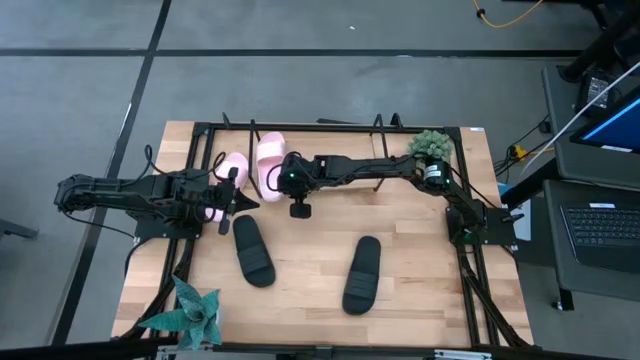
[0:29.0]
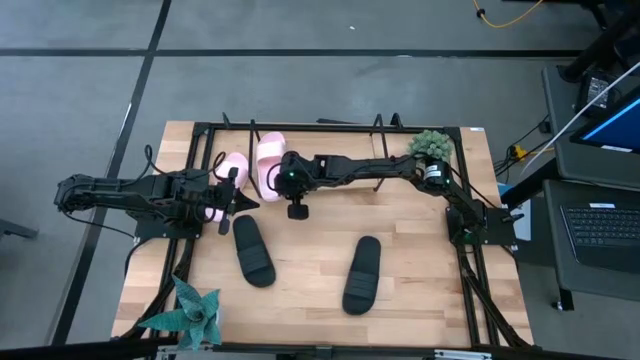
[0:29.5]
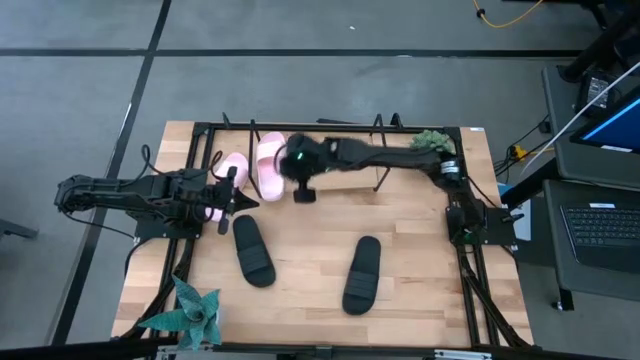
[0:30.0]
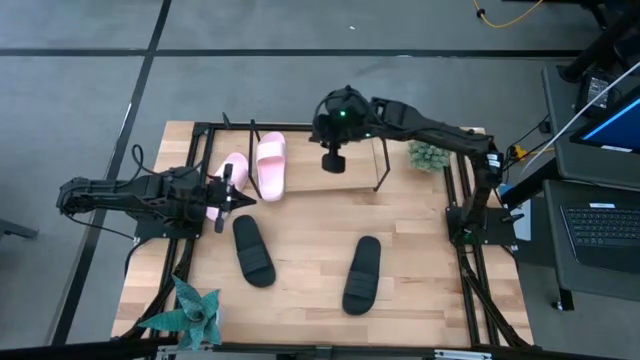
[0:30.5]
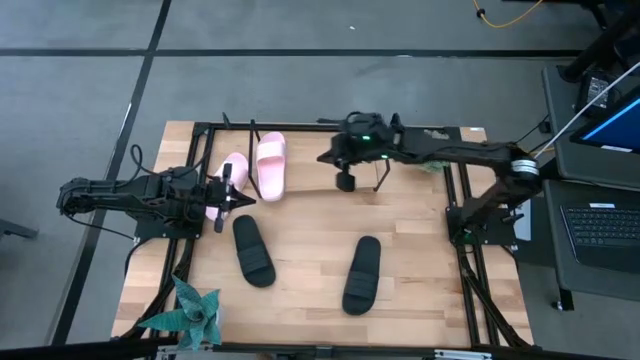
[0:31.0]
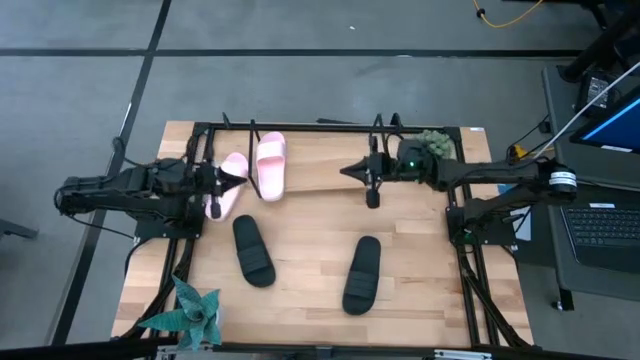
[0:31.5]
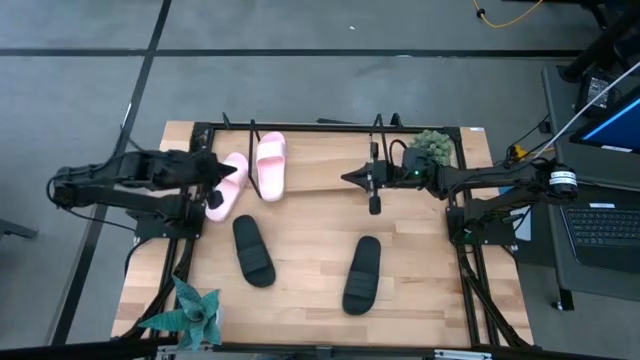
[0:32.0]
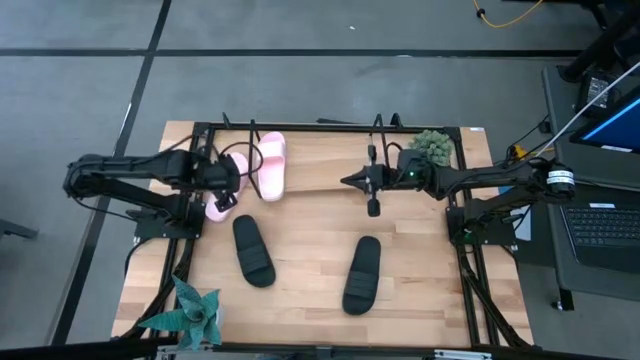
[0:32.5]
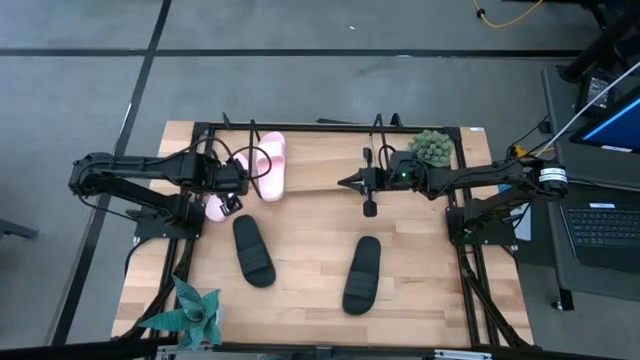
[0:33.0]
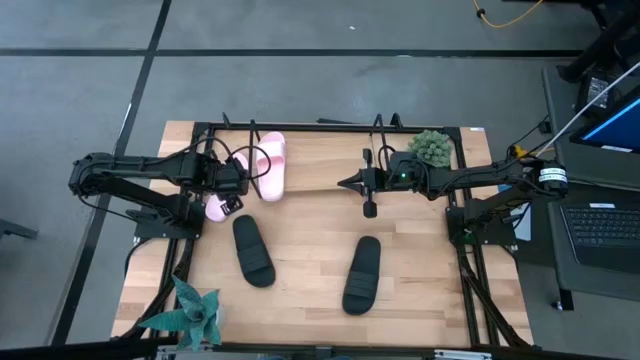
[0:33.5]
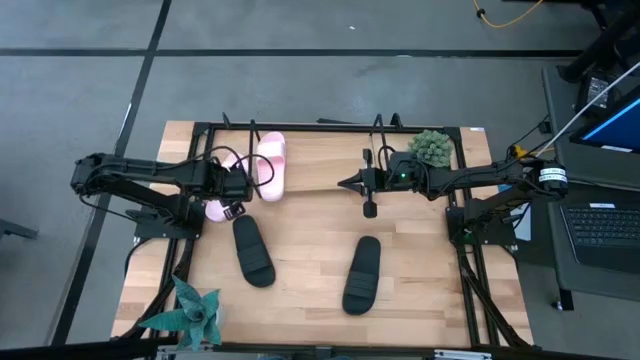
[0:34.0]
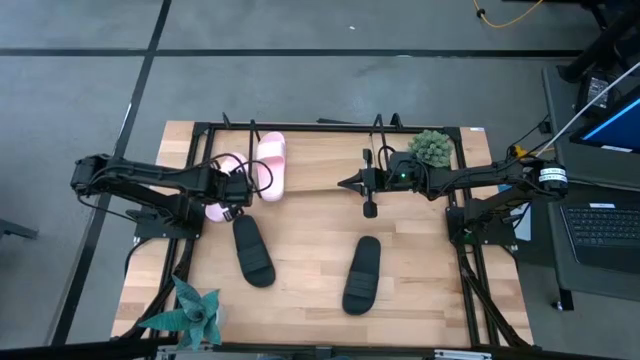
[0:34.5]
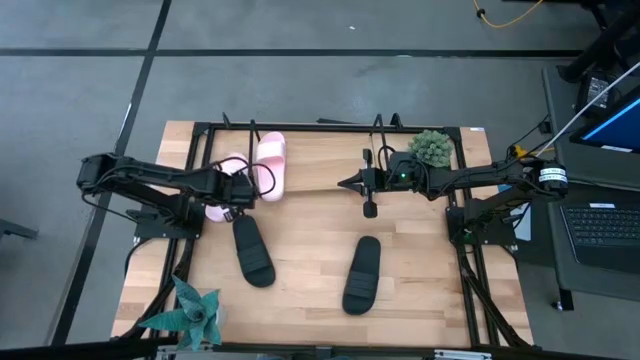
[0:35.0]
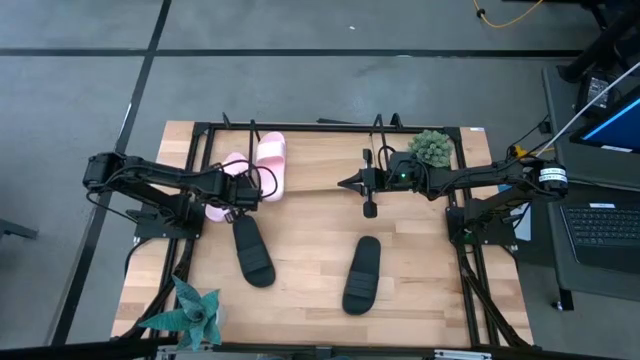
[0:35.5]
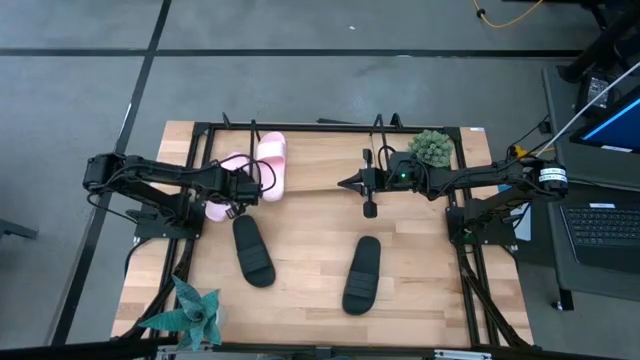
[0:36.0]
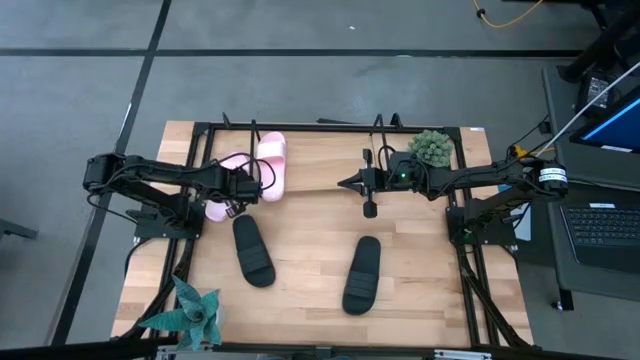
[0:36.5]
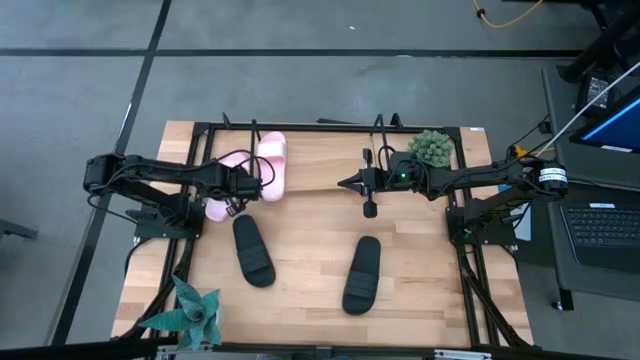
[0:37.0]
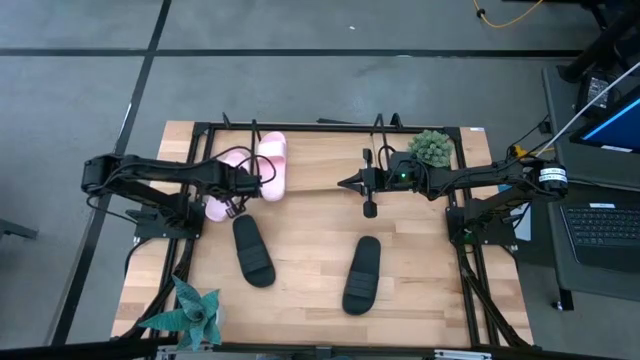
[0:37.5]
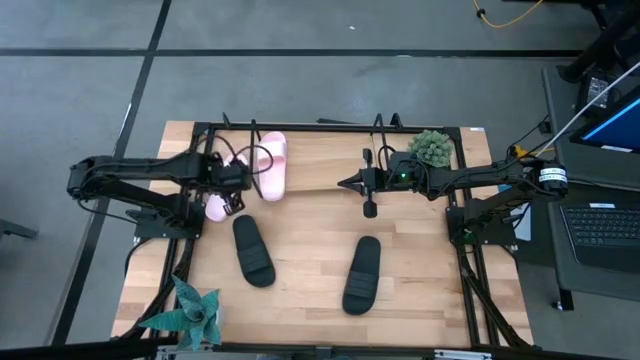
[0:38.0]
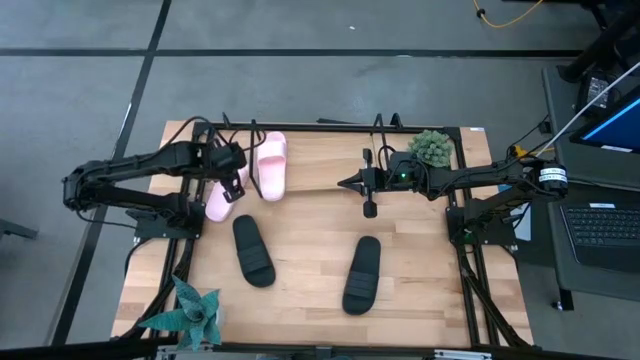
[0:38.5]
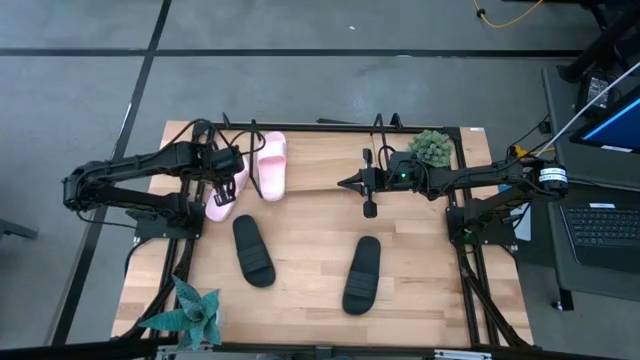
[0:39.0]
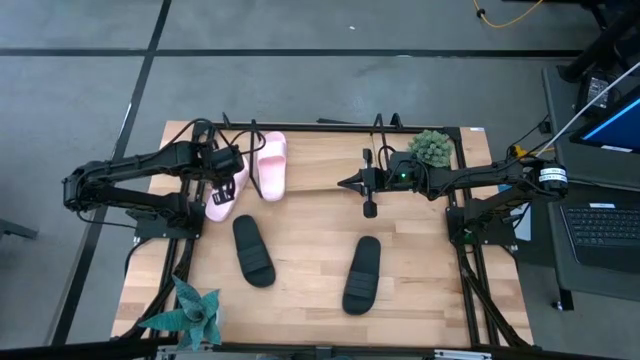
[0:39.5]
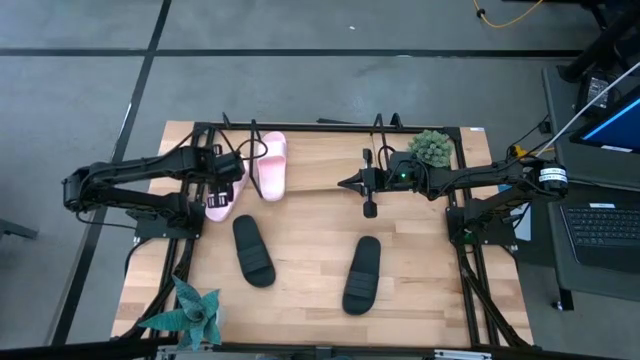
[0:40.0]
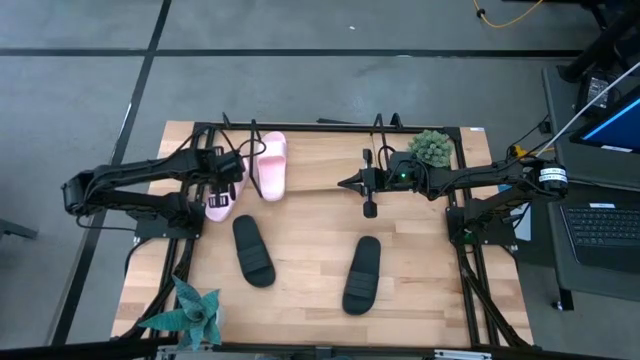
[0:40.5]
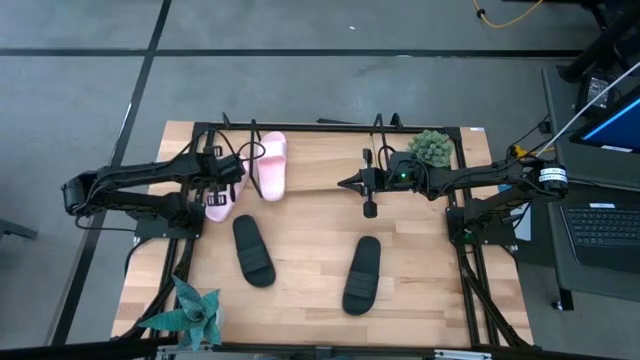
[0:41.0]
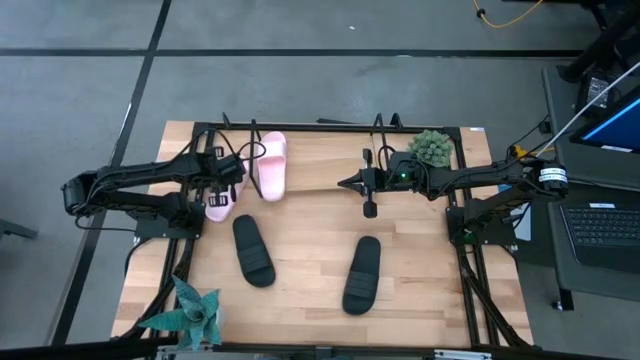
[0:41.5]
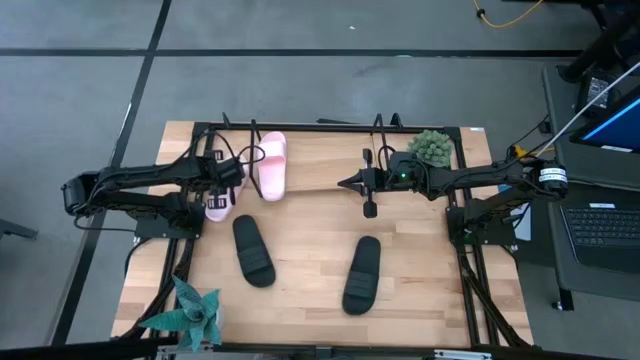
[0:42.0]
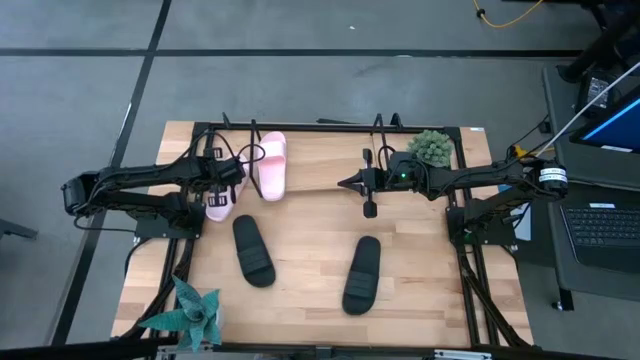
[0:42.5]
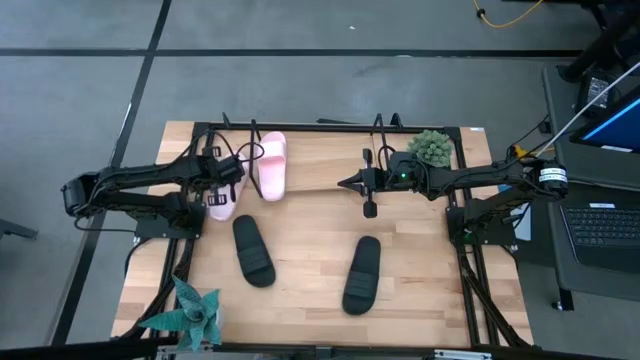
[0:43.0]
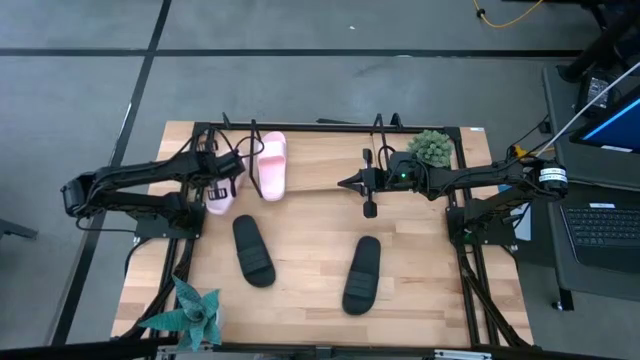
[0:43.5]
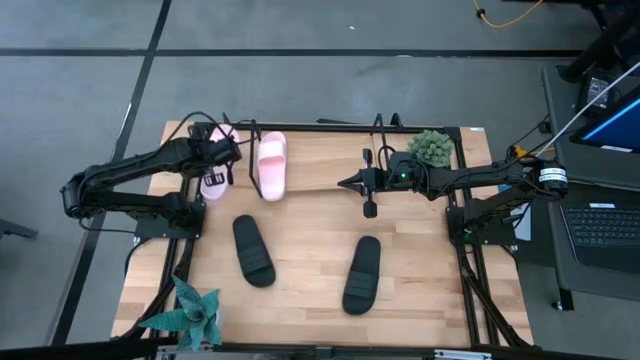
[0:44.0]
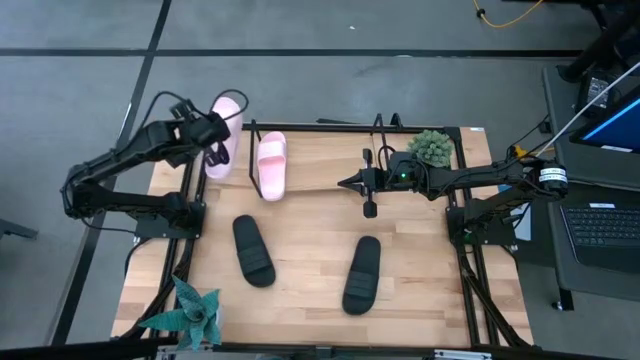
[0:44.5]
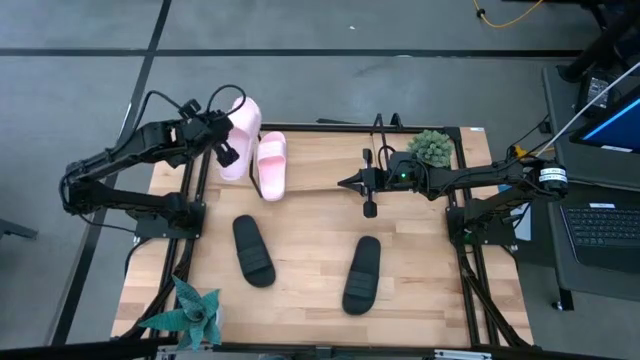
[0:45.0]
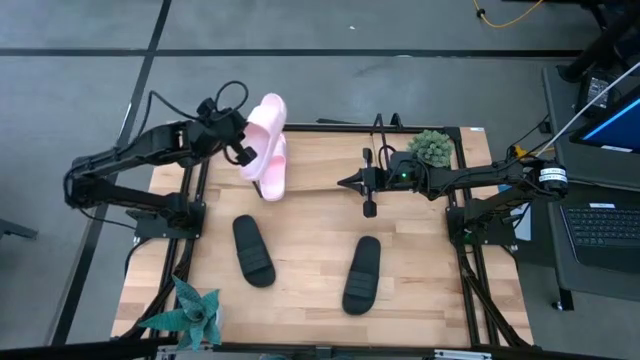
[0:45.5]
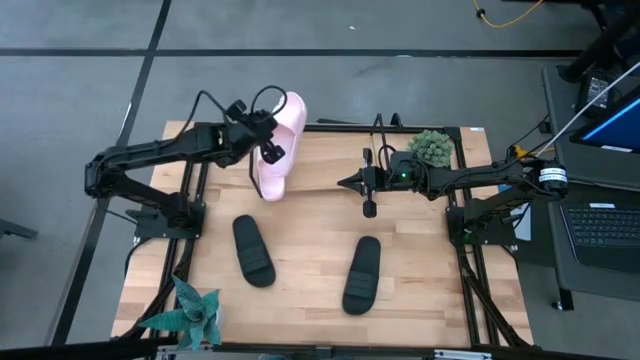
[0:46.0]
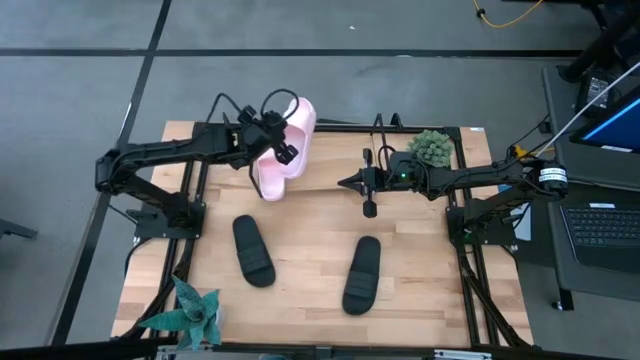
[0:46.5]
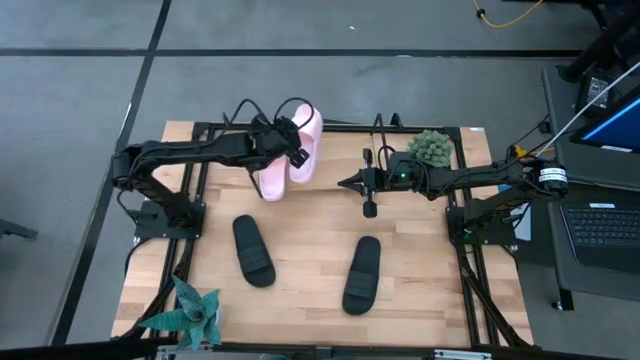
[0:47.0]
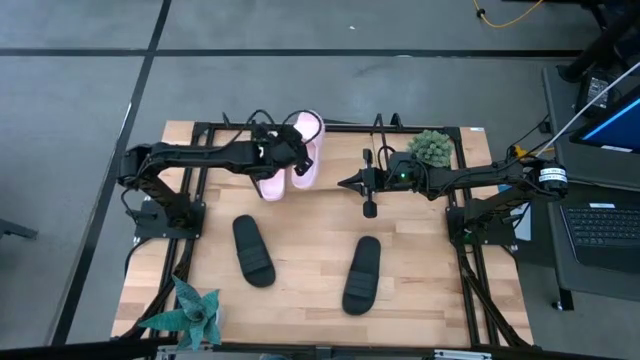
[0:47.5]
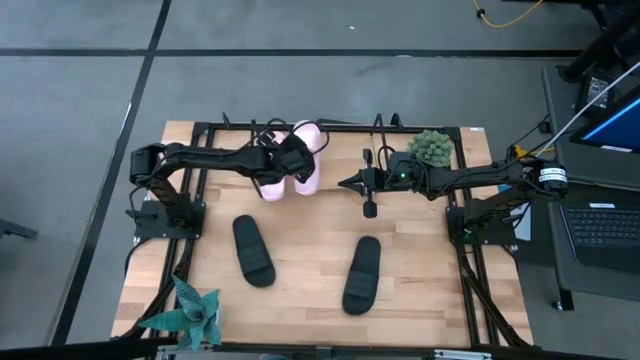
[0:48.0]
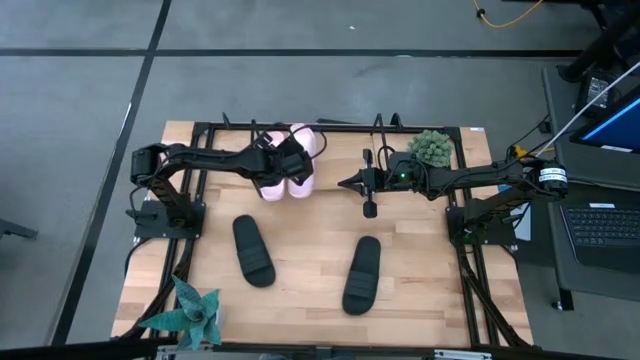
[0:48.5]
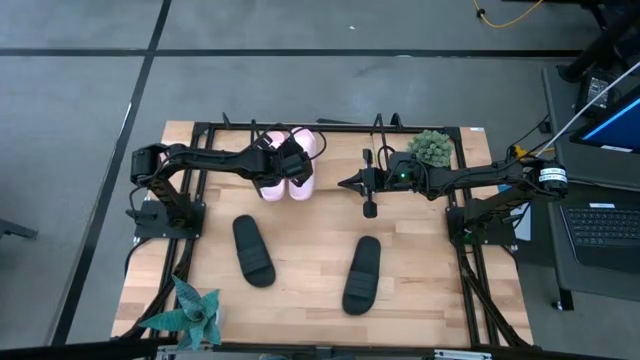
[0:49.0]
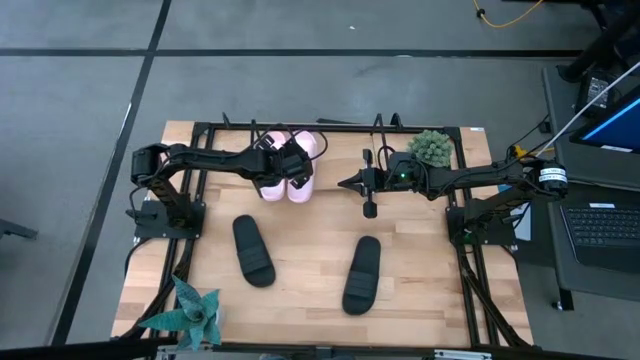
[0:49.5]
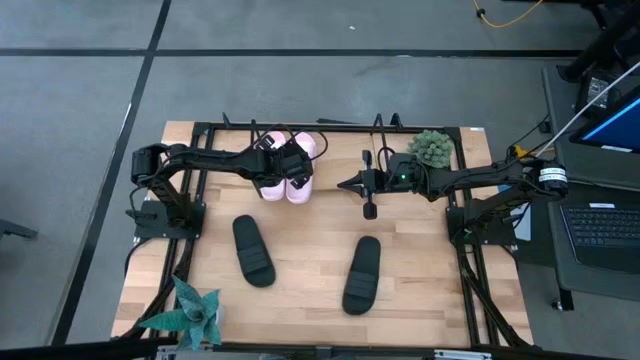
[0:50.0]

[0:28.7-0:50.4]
Task: Pick and place slides into the shelf
Put the pink slide on the shelf
